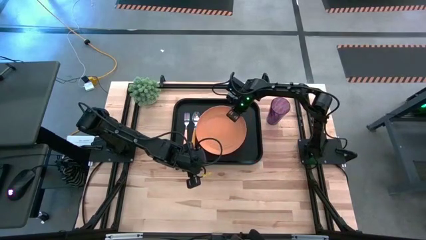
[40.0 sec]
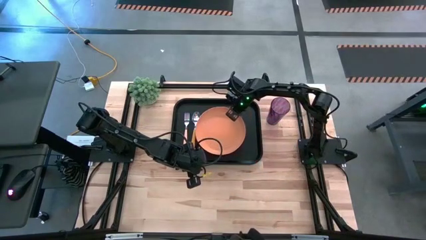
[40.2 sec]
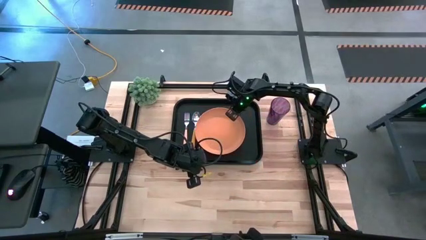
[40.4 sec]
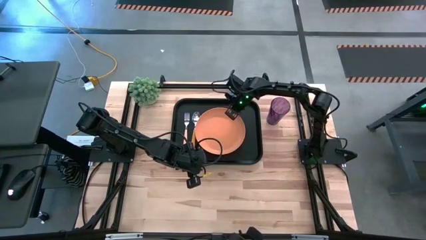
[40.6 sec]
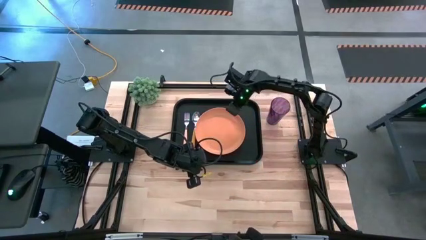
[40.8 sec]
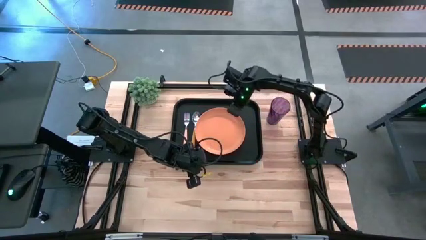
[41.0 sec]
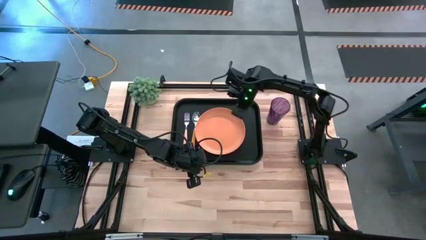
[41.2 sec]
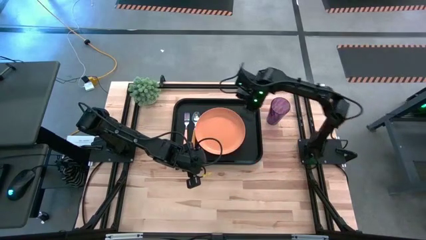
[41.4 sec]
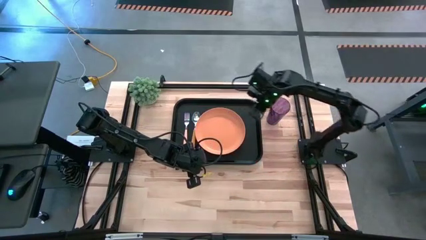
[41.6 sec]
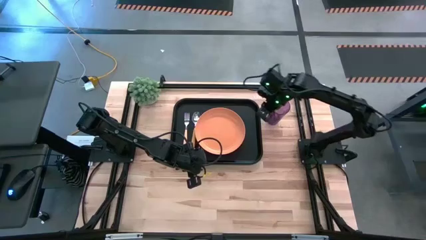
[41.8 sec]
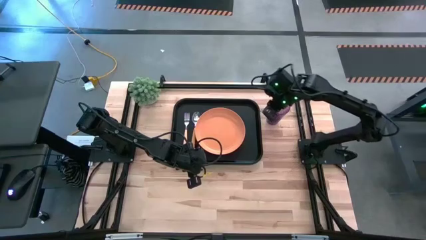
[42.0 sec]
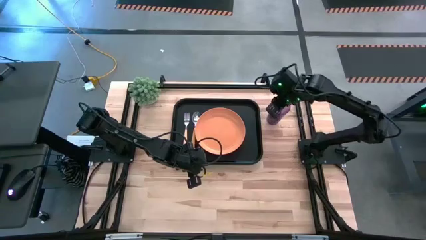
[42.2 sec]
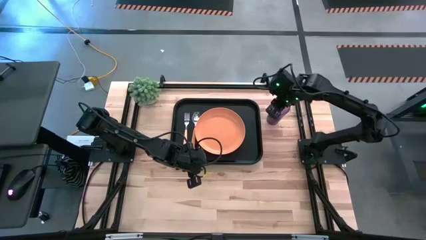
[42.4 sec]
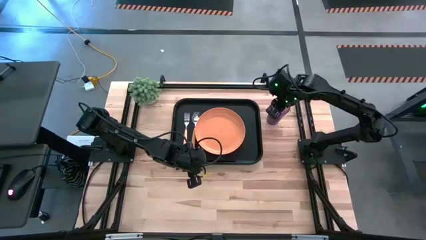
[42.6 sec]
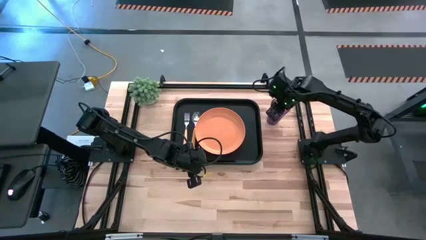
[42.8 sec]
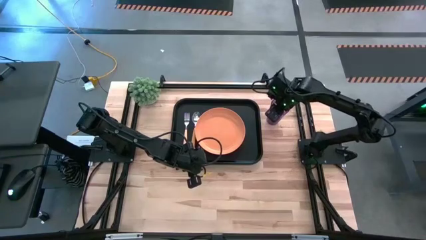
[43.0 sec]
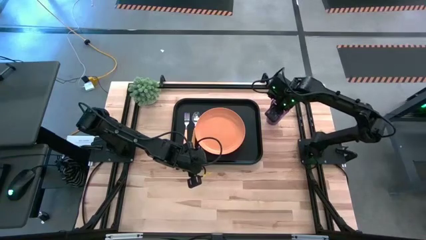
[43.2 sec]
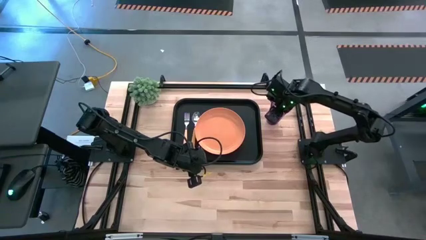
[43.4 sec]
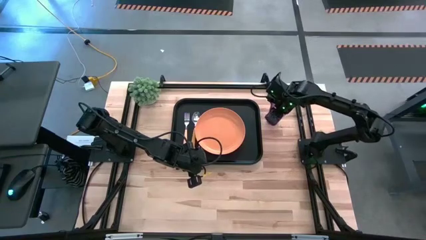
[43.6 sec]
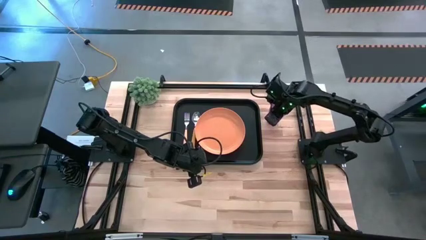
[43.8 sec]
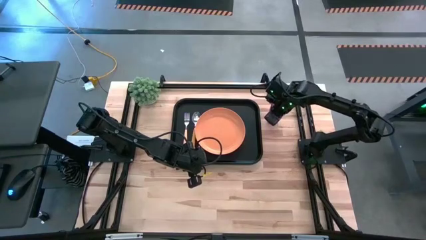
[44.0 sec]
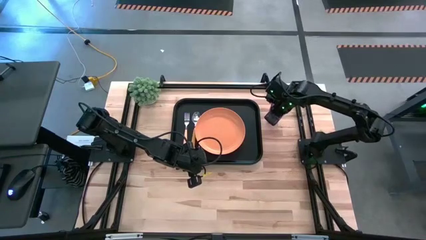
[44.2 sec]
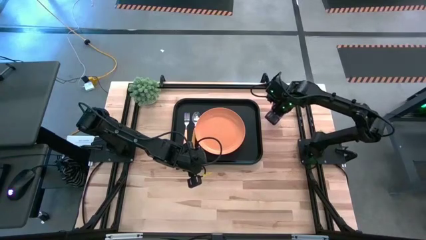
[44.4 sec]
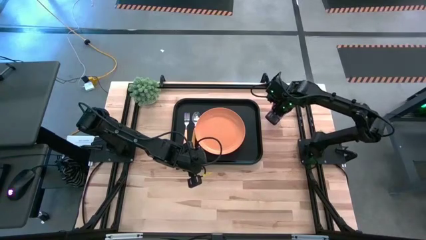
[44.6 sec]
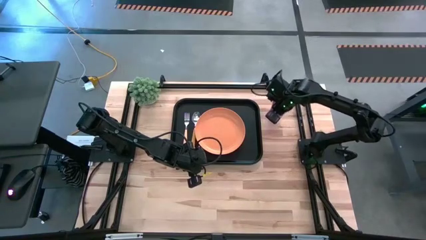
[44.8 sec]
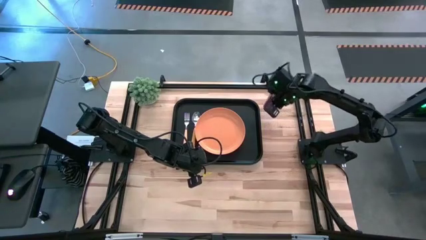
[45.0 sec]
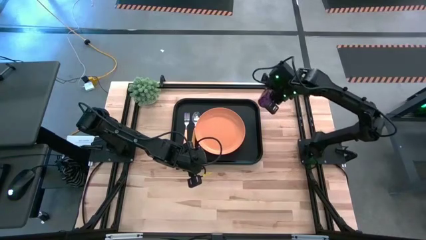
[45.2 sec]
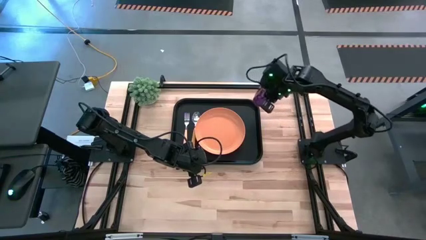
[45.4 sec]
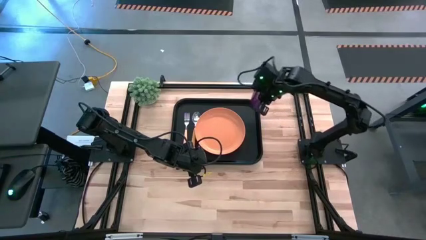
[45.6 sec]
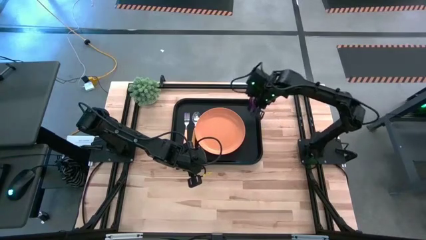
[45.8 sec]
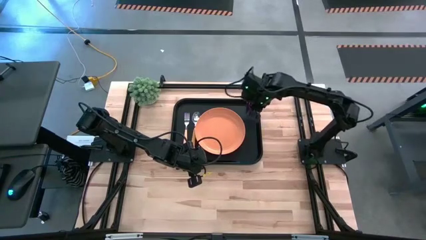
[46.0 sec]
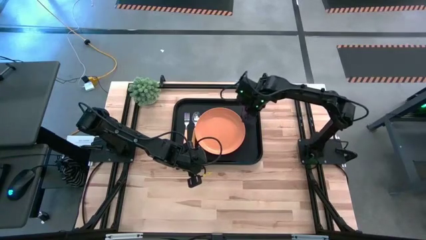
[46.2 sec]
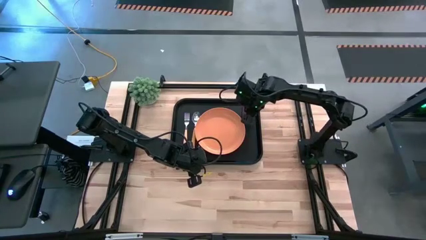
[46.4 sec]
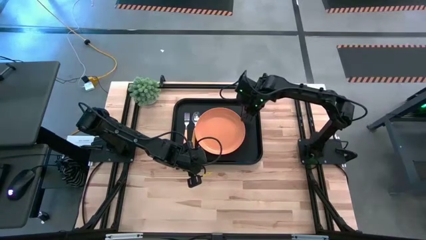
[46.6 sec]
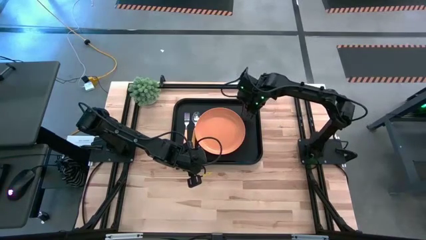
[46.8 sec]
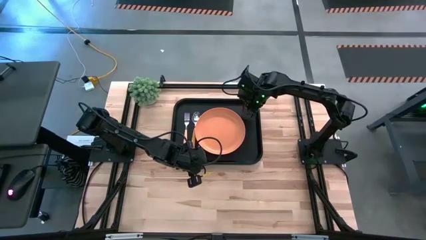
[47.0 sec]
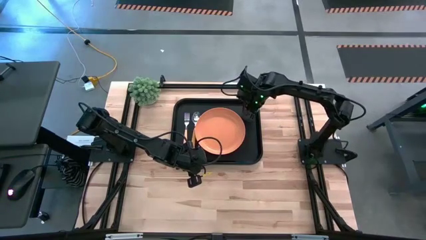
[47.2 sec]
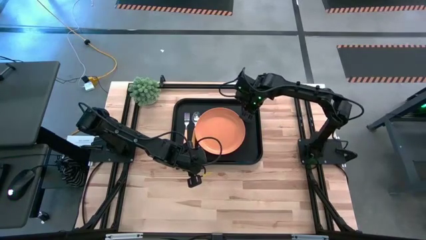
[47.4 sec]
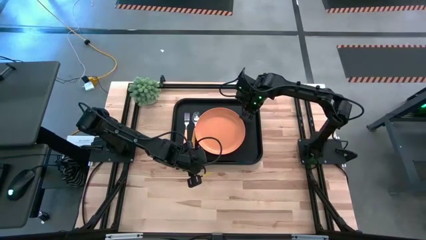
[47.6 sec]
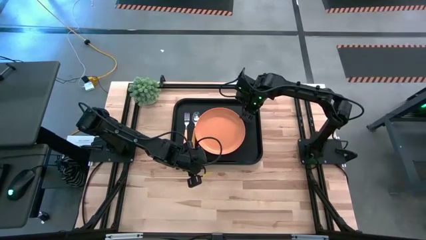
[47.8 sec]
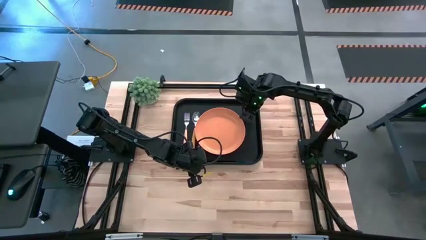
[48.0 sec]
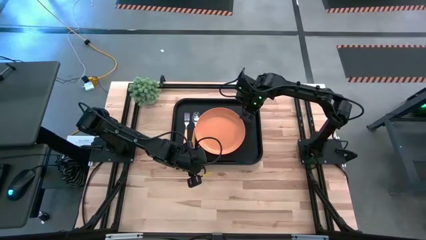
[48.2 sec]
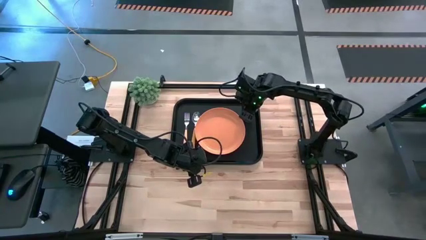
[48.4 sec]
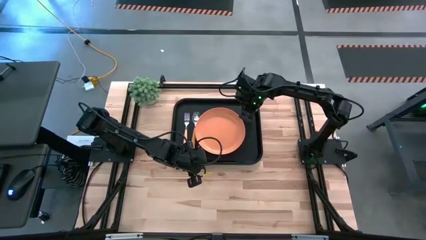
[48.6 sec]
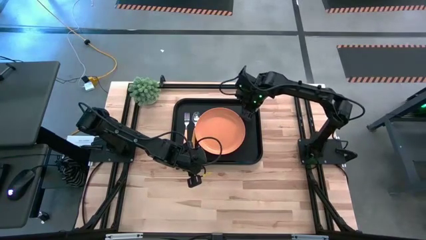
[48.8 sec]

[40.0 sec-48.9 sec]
Task: Pick and place plate/cup/fork/spoon on tray
Put the violet cup into the black tray on the top right side of the orange plate

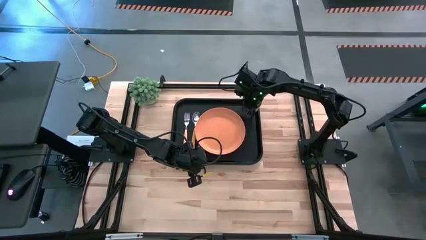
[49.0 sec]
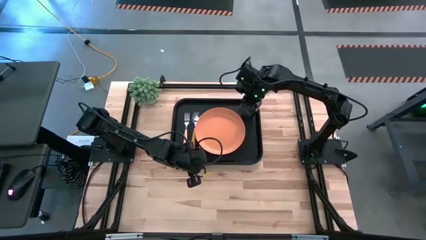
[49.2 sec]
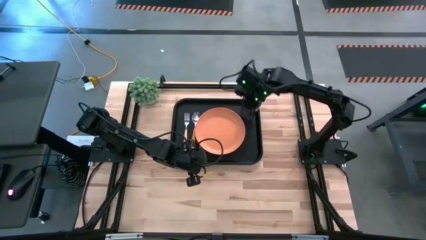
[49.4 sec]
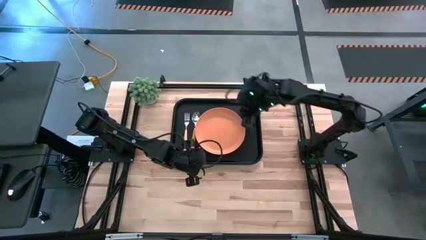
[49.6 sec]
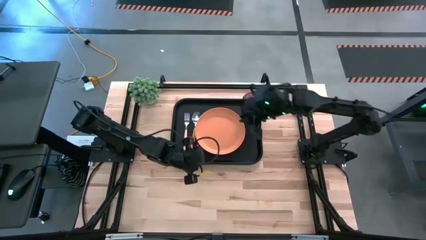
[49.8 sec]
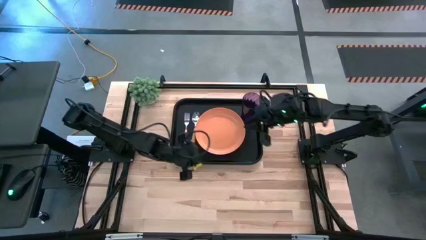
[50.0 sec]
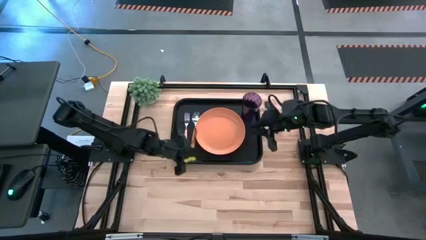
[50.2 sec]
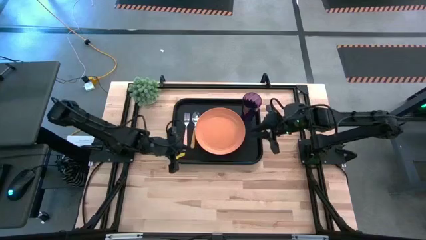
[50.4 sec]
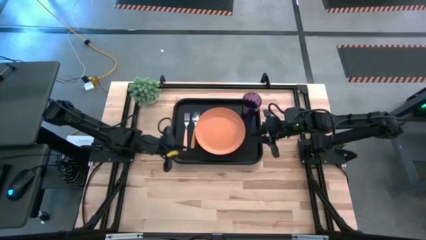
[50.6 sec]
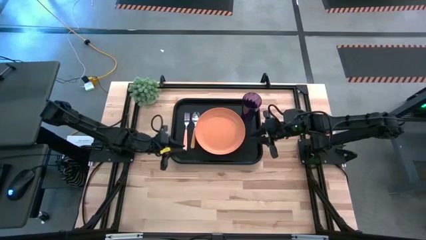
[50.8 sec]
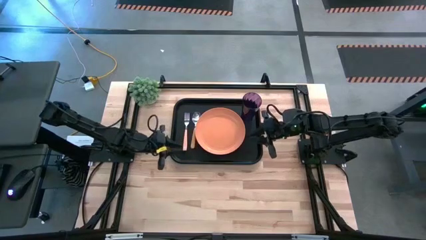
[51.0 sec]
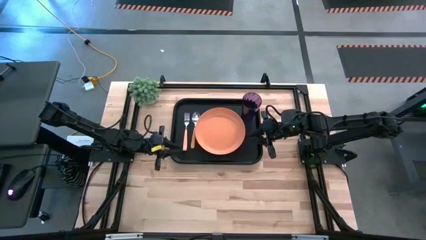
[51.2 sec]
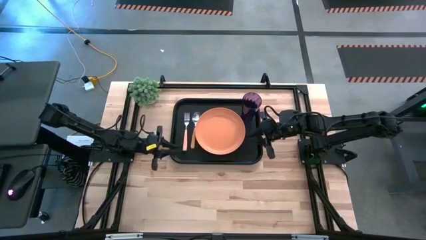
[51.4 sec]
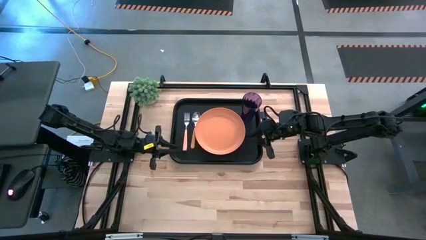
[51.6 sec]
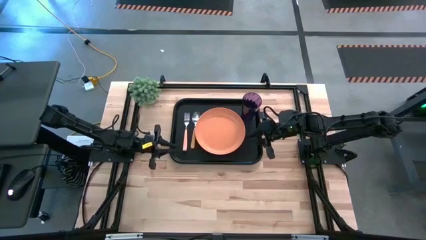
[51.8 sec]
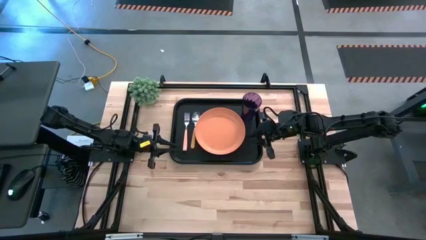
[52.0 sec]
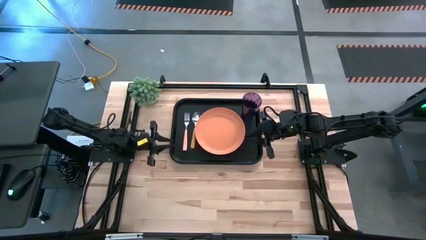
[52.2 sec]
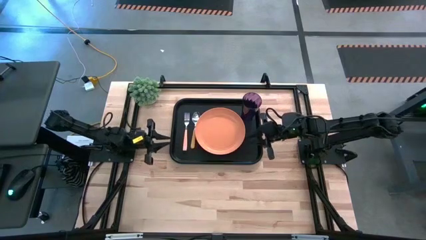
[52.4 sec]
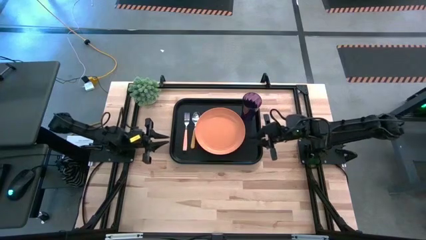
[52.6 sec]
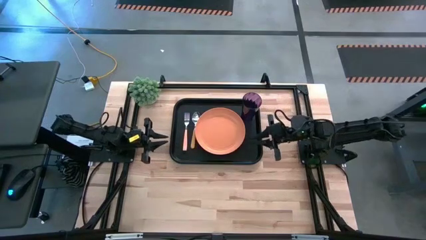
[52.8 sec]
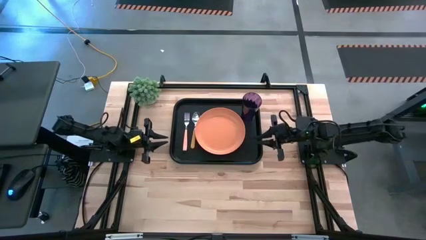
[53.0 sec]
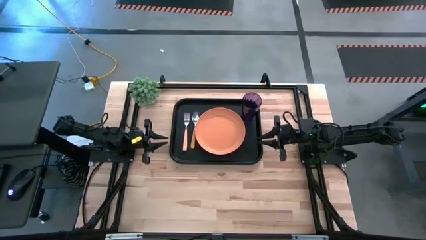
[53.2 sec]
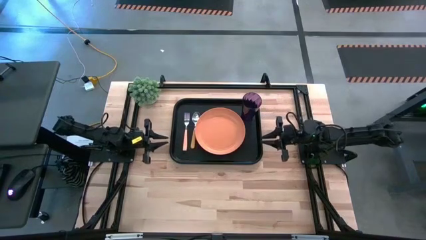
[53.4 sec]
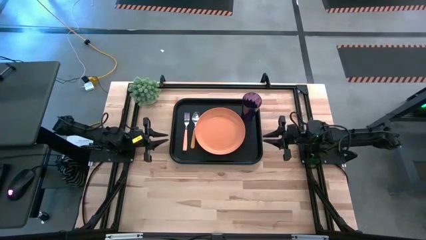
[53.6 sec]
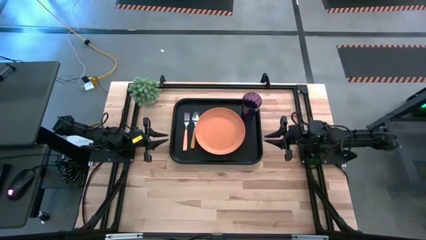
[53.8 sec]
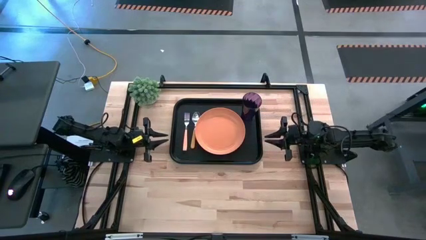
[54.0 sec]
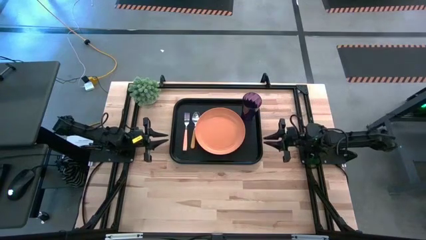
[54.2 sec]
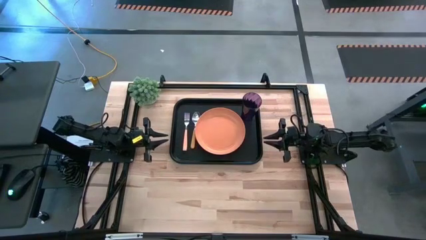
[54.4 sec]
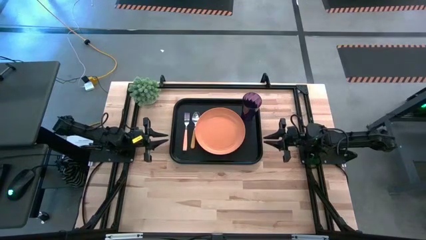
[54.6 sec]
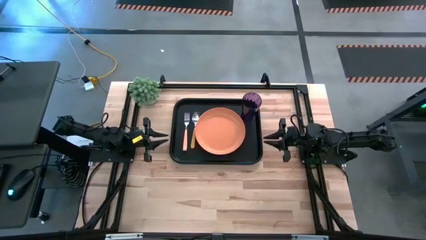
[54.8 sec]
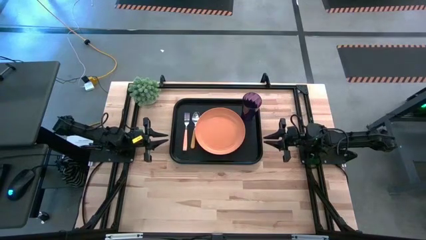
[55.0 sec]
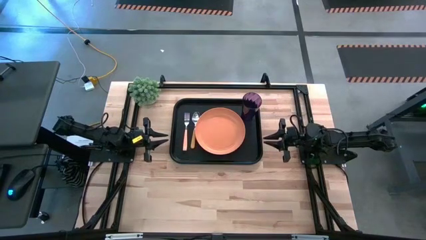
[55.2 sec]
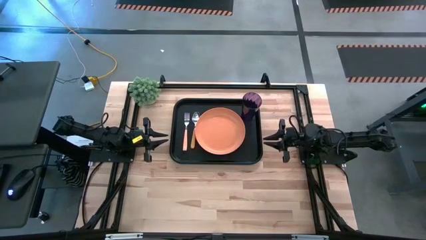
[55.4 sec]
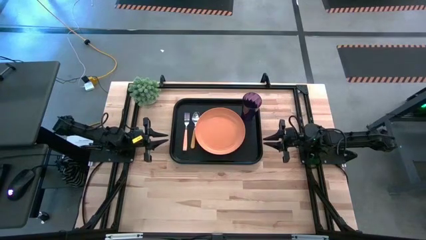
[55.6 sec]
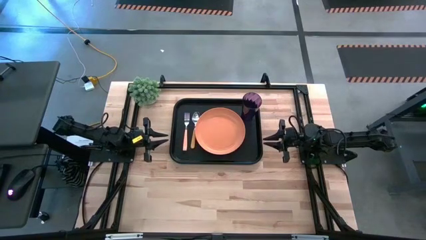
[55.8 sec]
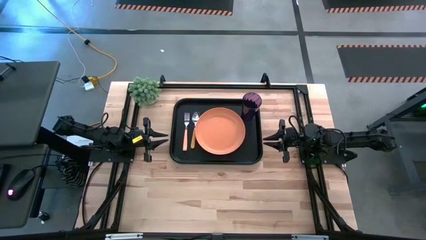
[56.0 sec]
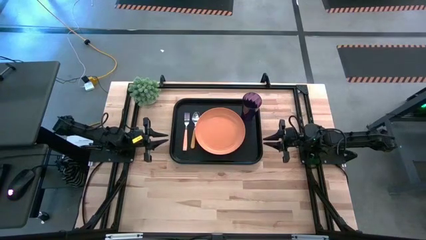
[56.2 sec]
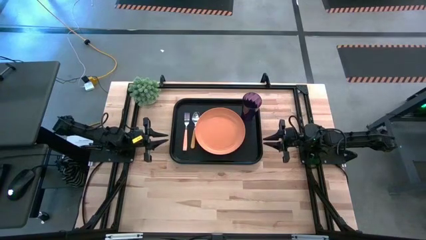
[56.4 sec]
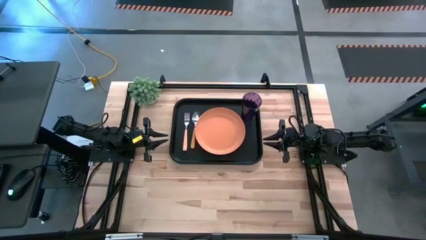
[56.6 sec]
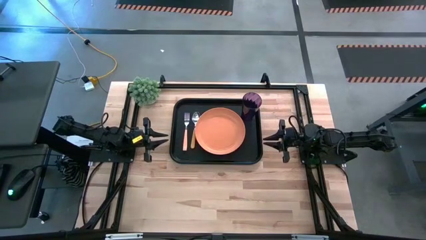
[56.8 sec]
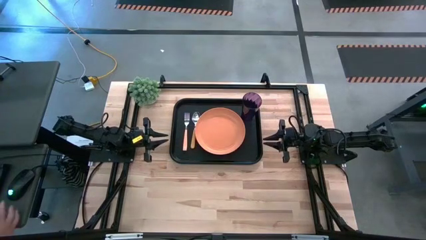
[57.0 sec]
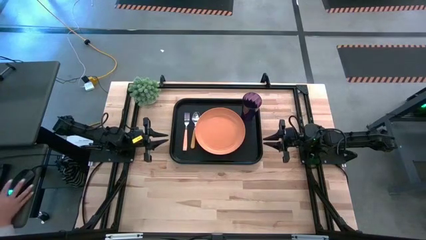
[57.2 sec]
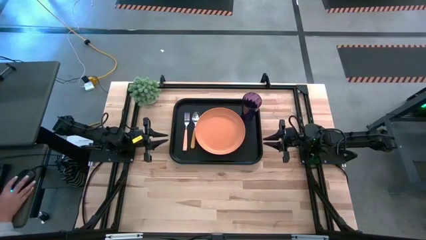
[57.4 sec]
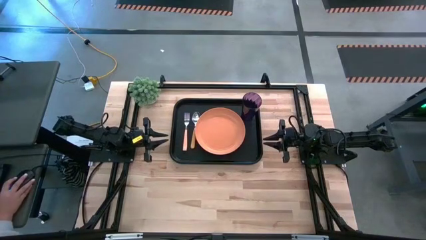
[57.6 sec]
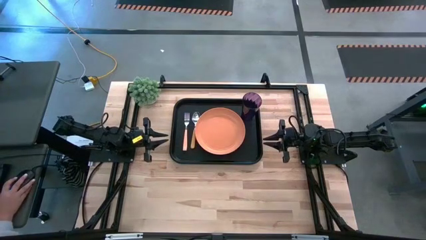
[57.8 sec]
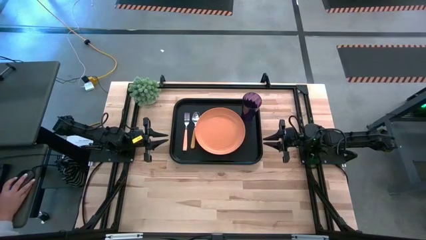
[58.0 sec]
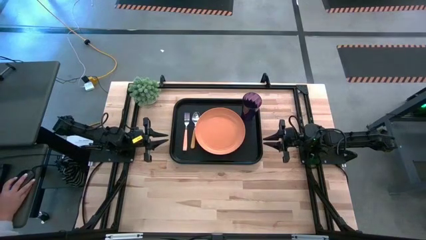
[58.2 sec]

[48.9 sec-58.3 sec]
Return to Home Position
